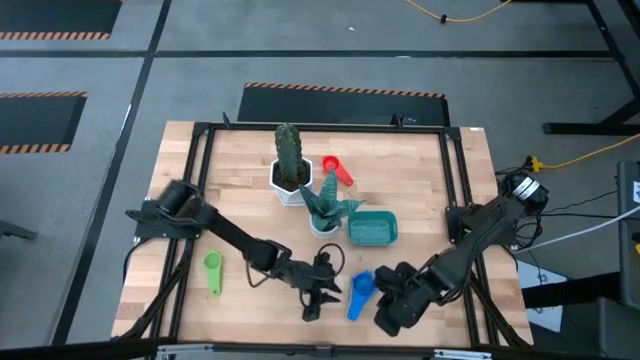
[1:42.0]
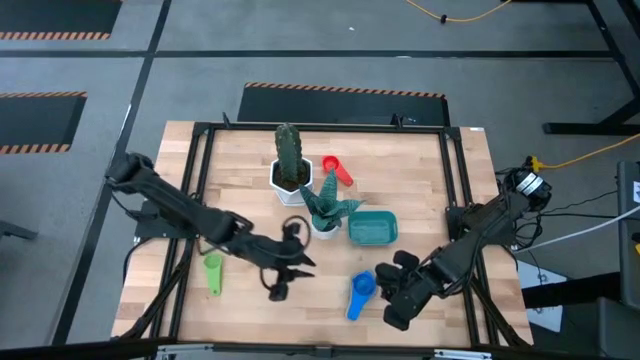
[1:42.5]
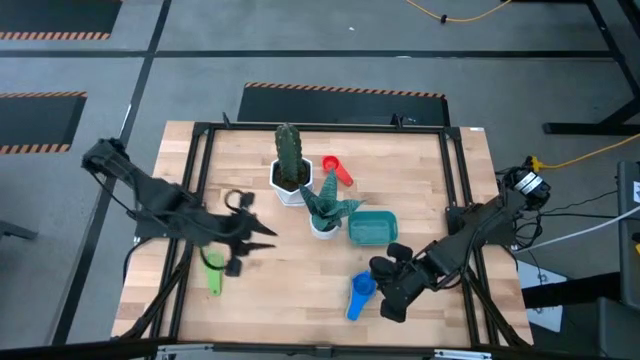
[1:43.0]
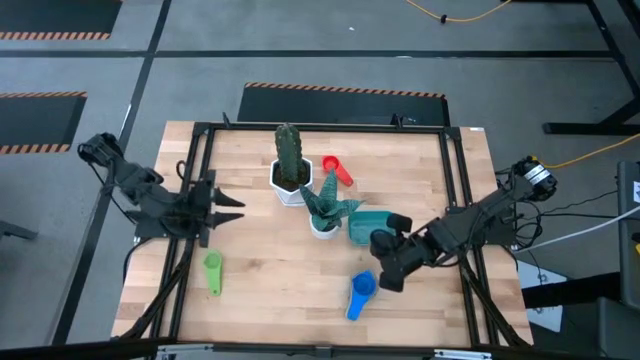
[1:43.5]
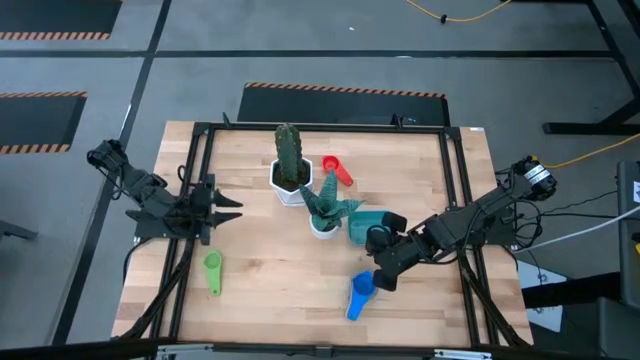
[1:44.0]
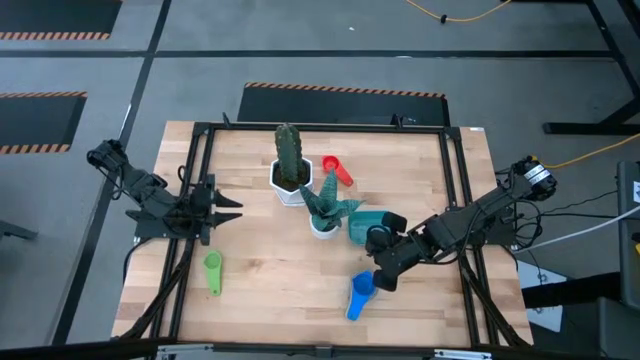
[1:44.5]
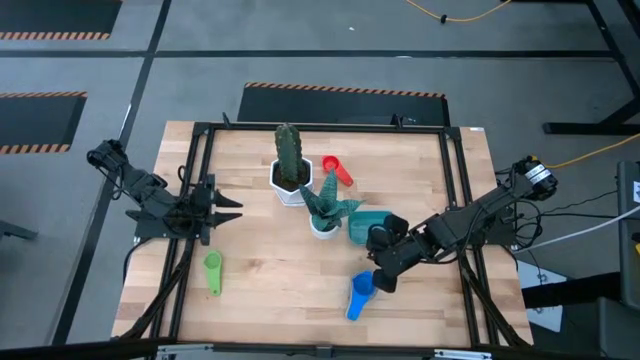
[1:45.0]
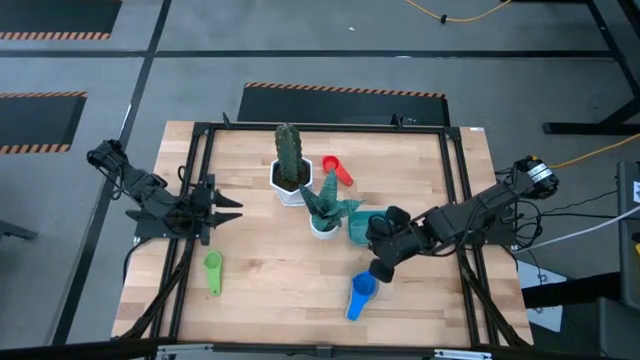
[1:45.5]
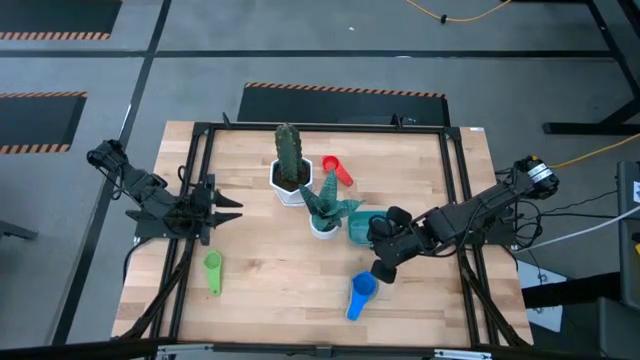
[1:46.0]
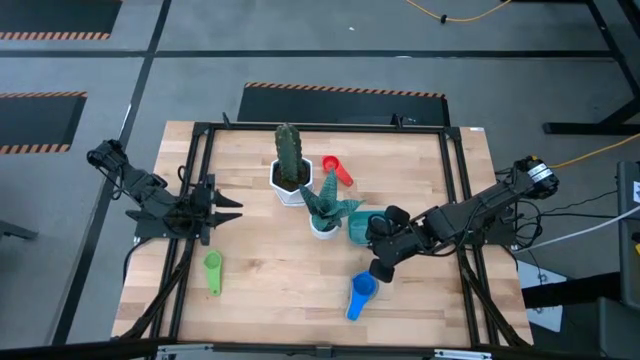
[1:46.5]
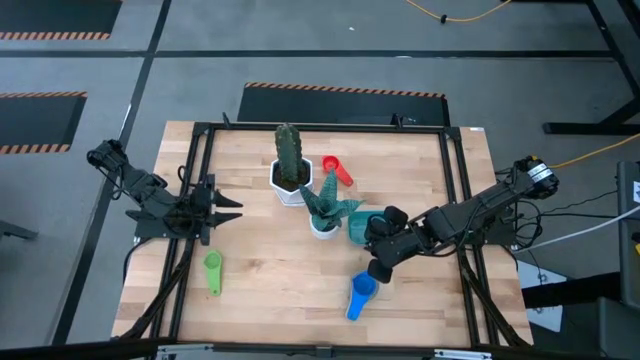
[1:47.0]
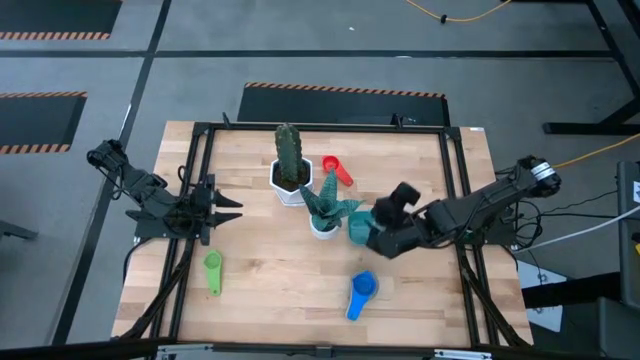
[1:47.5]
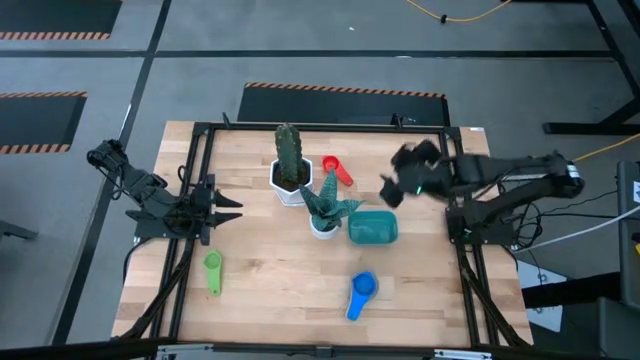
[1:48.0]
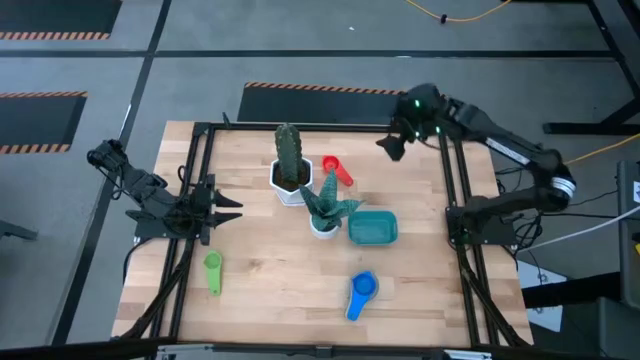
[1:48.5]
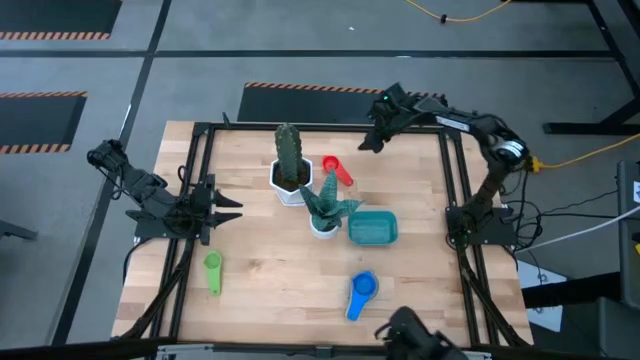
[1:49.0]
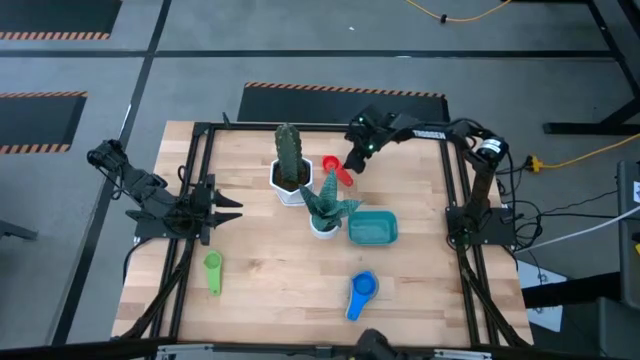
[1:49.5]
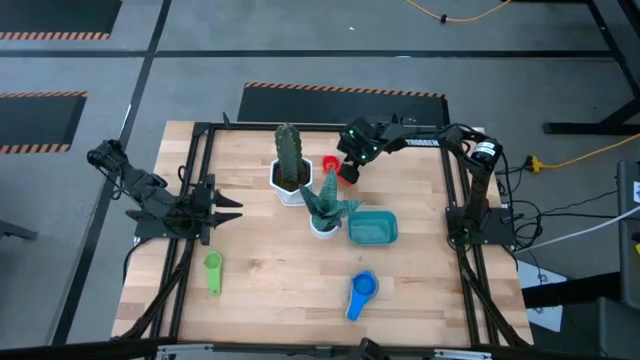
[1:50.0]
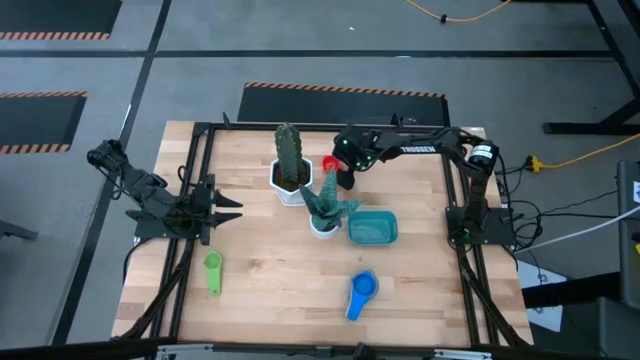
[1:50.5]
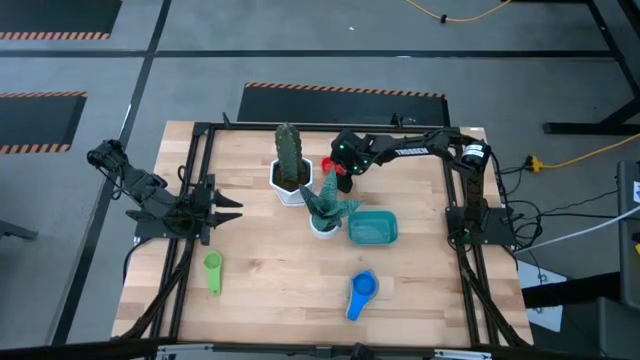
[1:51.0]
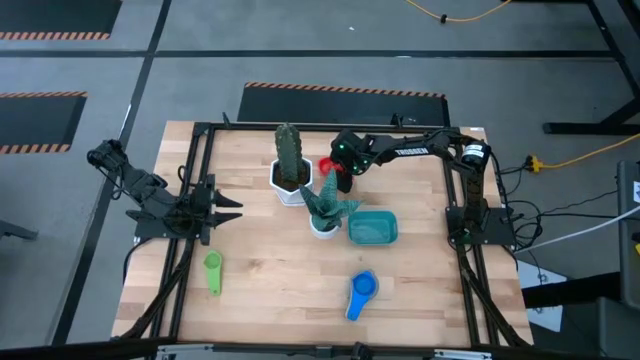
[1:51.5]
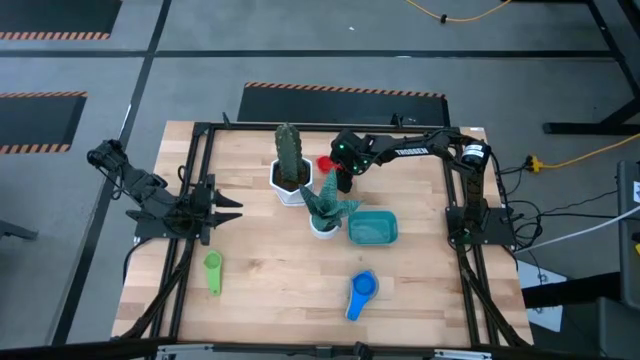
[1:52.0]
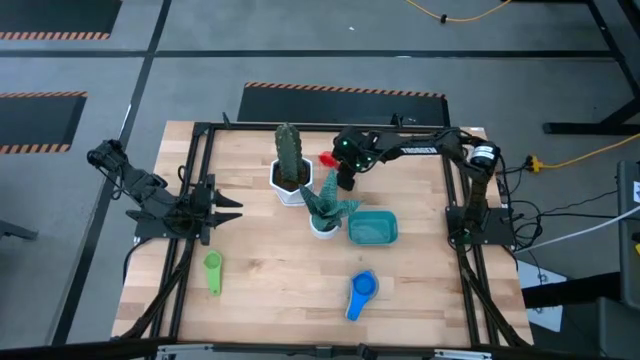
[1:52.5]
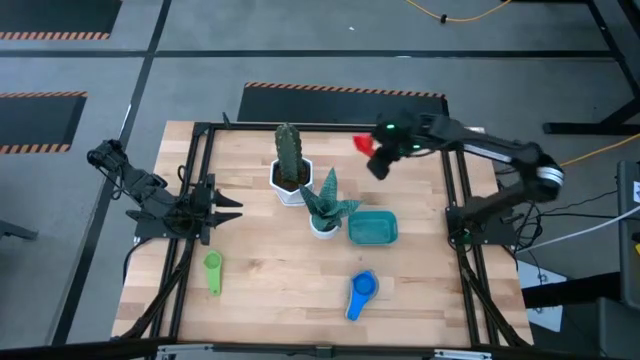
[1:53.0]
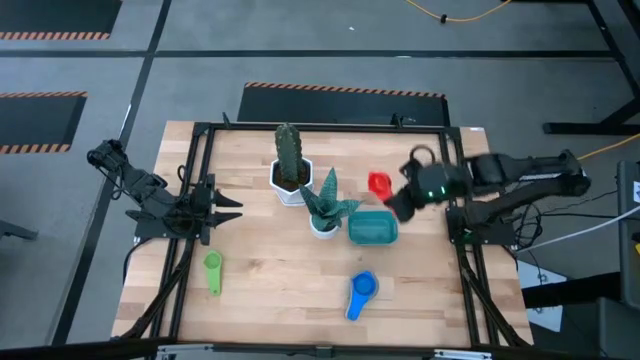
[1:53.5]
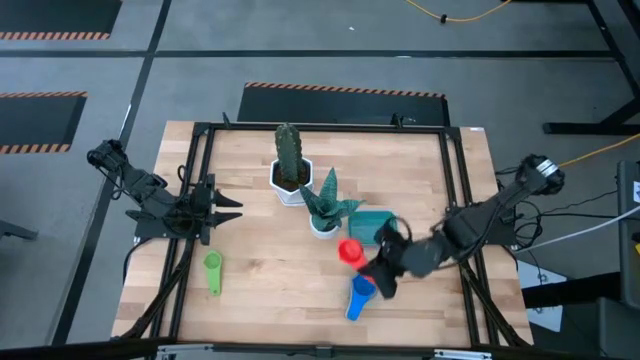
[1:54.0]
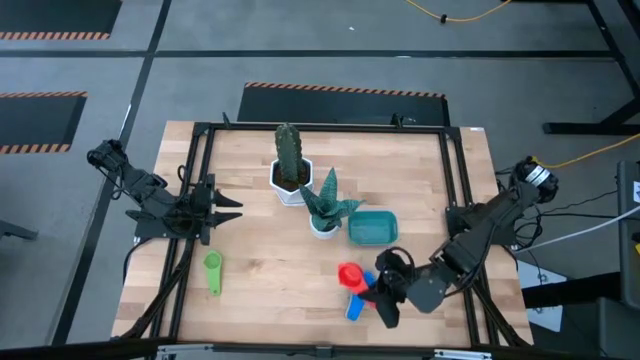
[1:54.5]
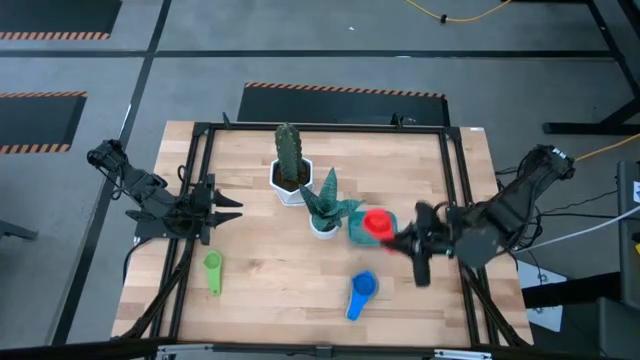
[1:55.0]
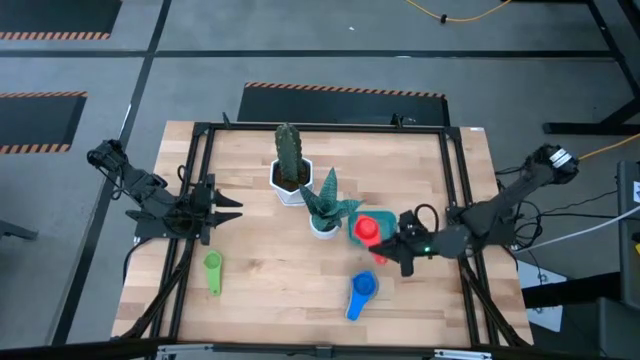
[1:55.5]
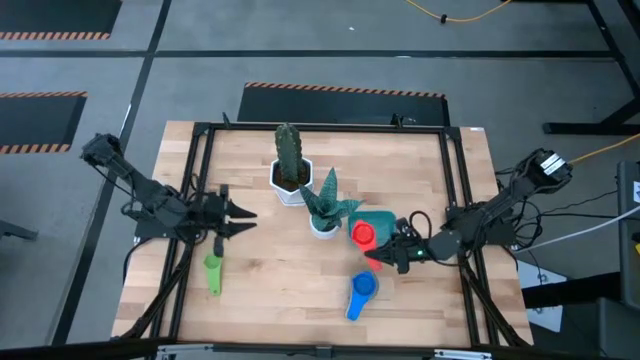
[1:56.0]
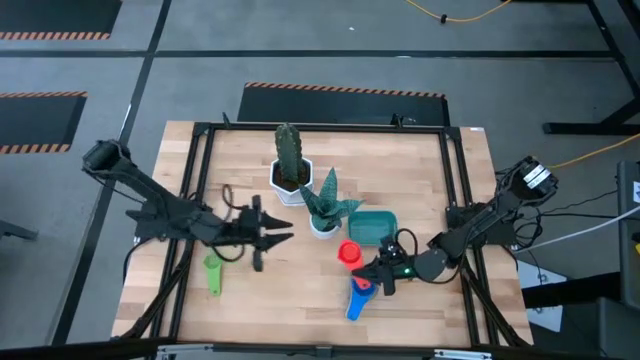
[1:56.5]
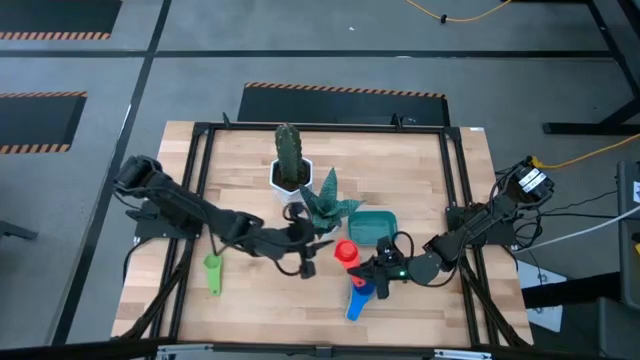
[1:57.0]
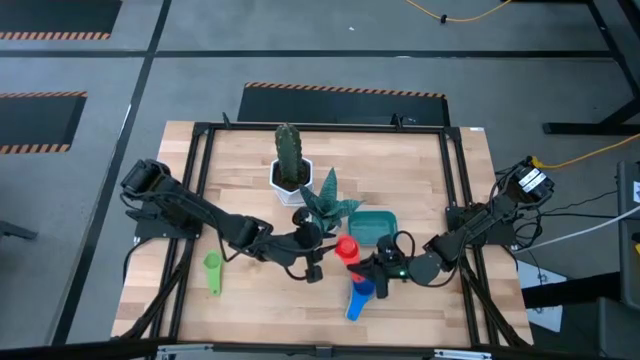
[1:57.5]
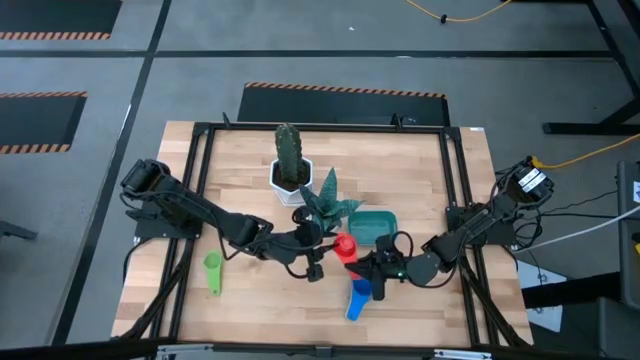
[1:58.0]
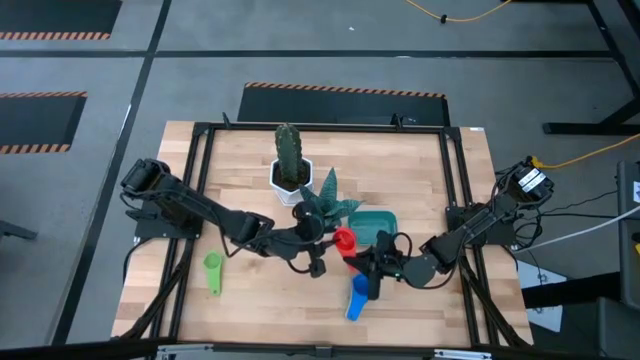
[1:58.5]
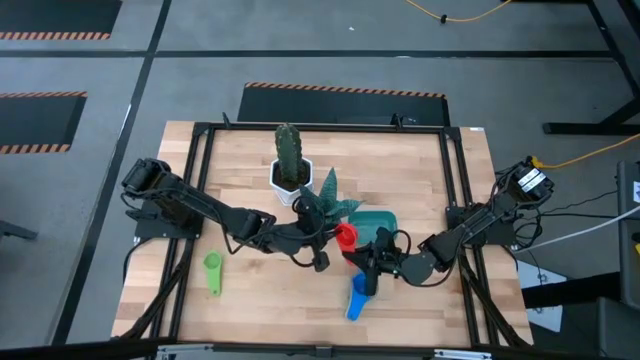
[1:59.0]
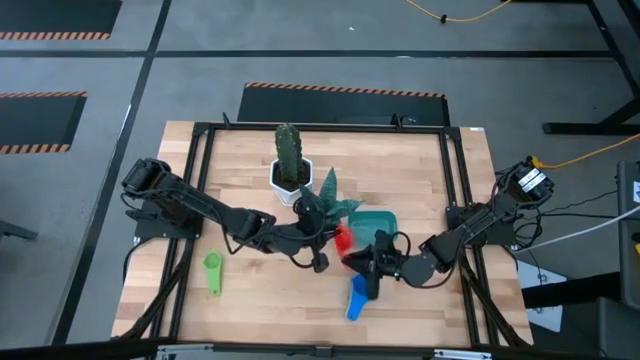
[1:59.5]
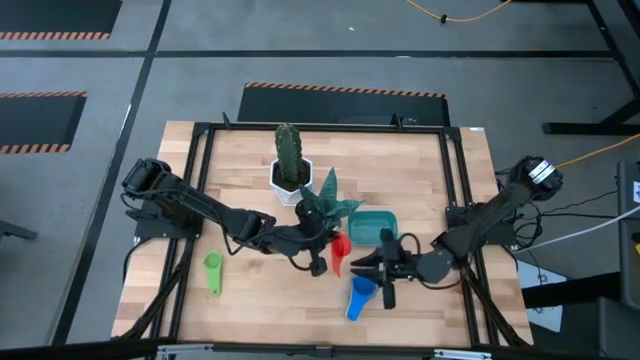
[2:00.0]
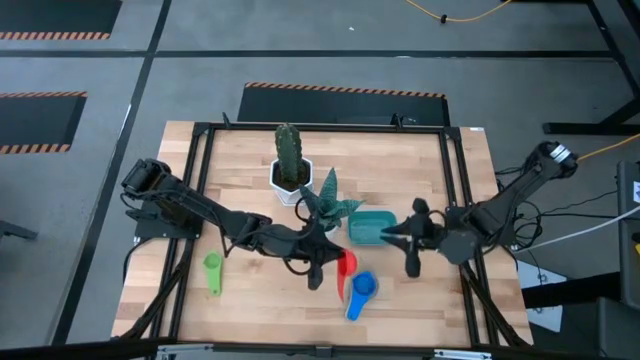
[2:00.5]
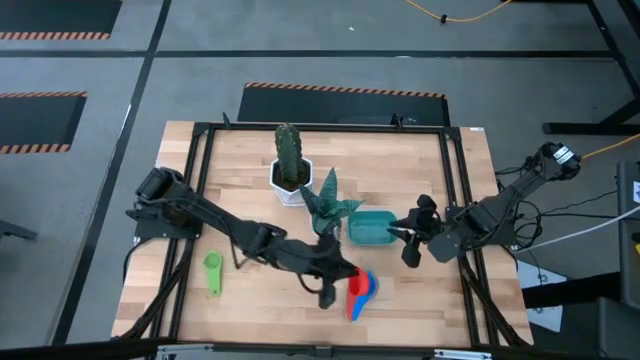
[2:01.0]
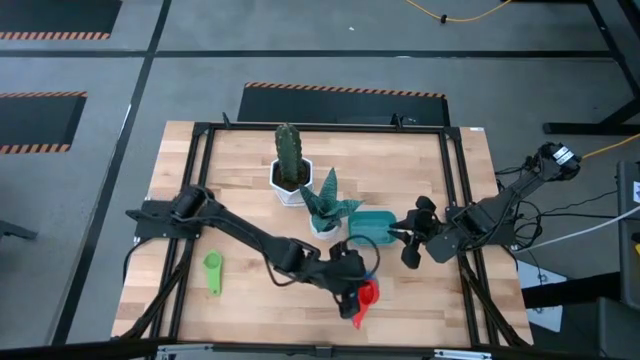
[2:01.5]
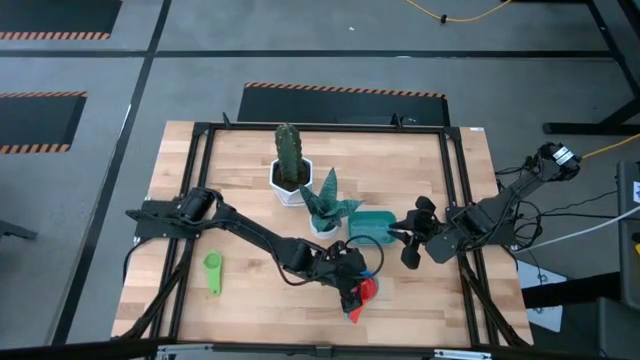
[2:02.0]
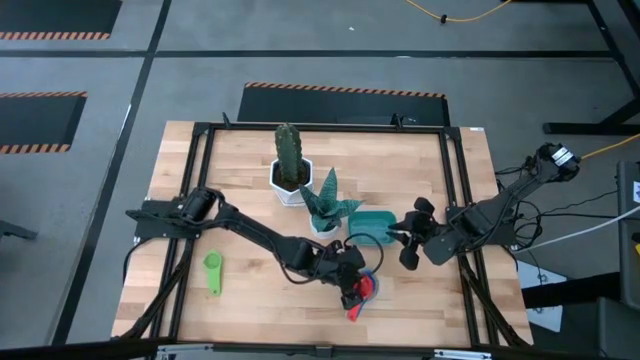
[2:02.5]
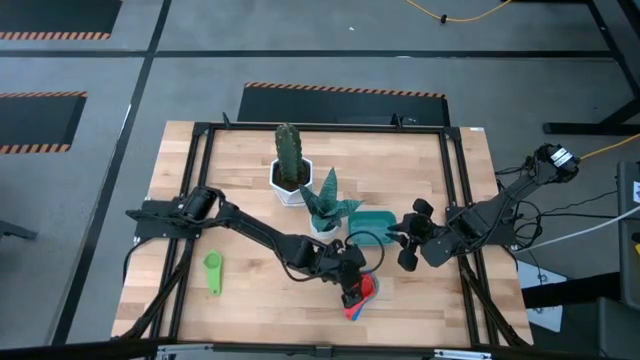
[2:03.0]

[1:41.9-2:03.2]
Task: Nest measuring cups in basket
Stack the red measuring cup on top of the blue measuring cup

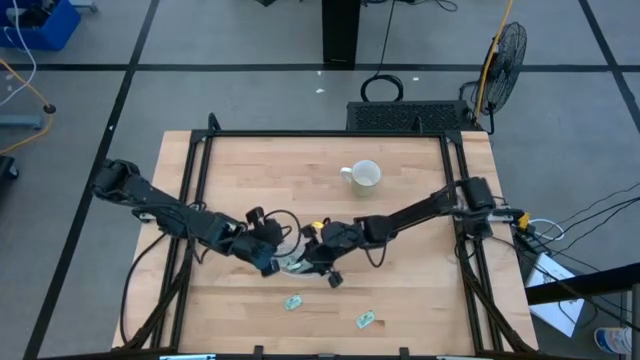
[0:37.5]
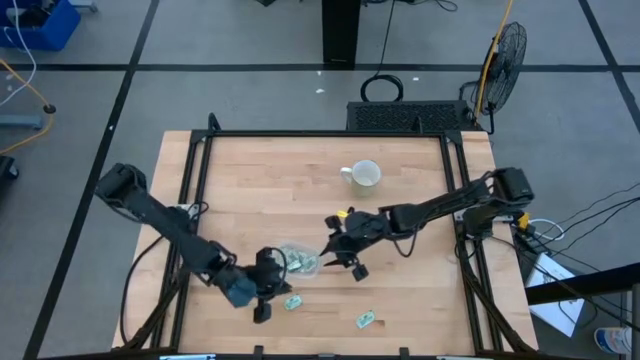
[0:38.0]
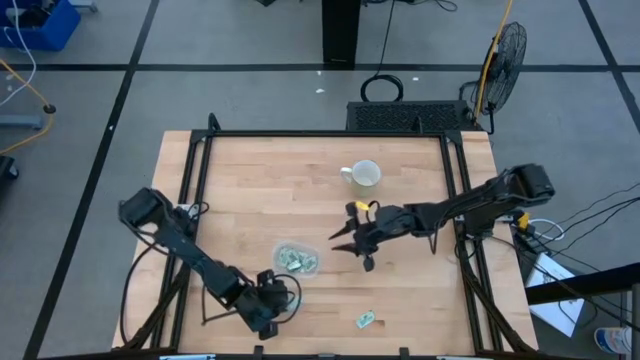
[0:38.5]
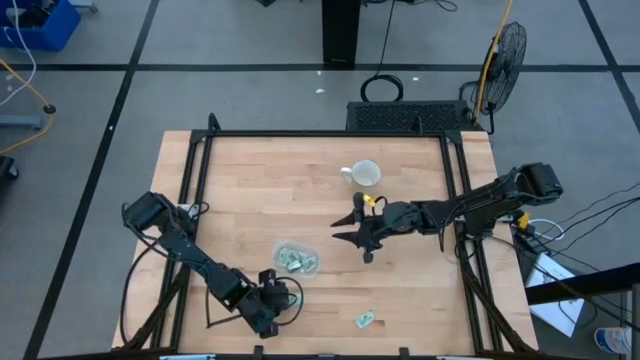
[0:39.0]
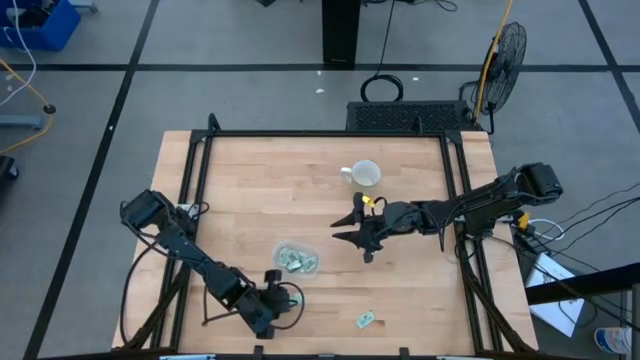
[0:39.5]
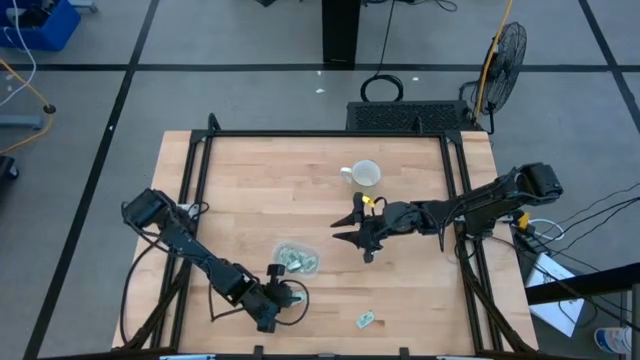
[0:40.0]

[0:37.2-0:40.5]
Task: Pick and place Stevia / Truvia into bins
Put the light green stevia packet into the transparent bin
